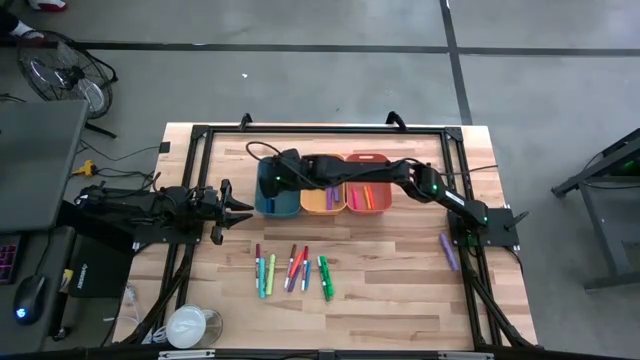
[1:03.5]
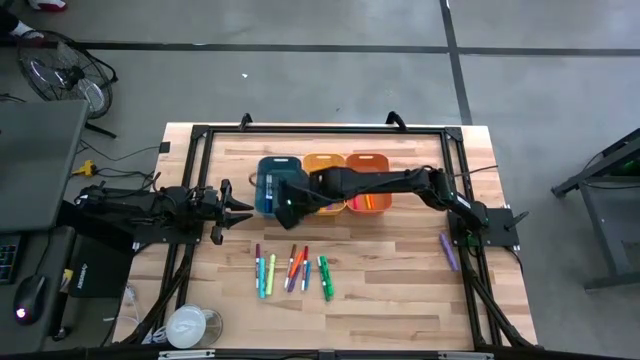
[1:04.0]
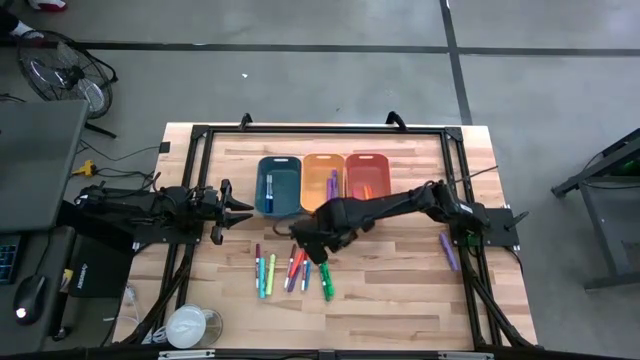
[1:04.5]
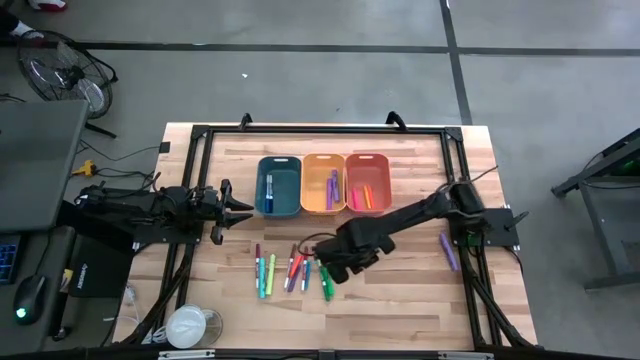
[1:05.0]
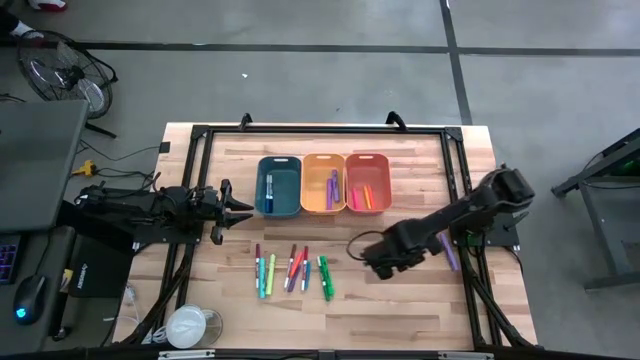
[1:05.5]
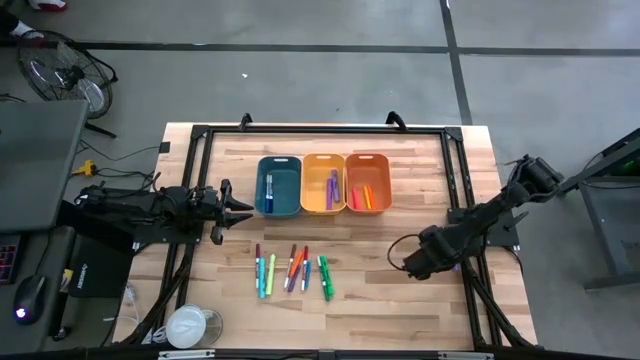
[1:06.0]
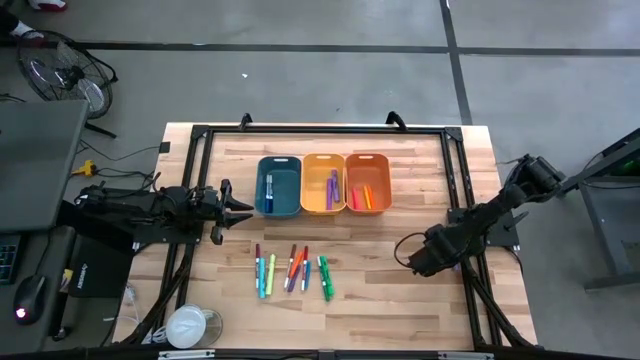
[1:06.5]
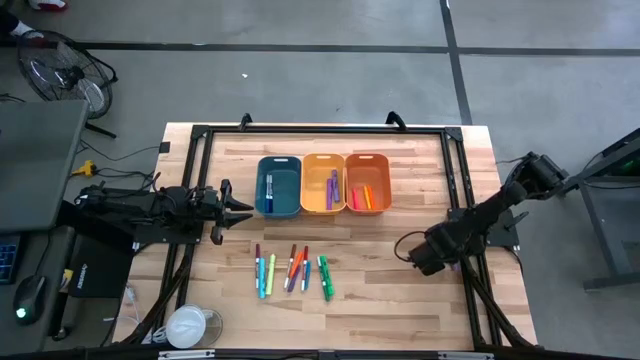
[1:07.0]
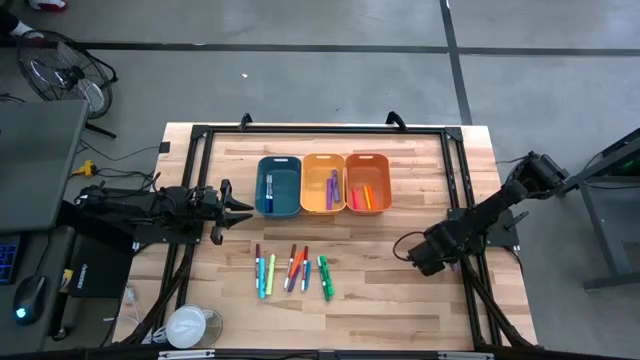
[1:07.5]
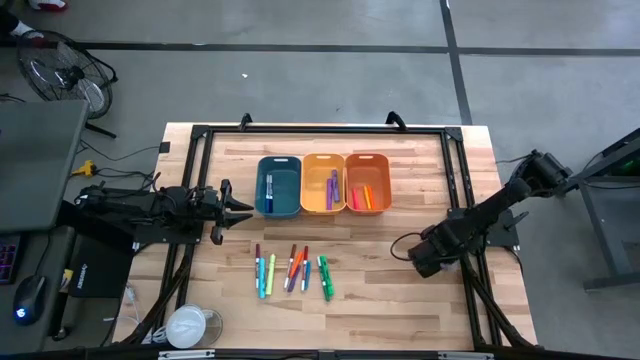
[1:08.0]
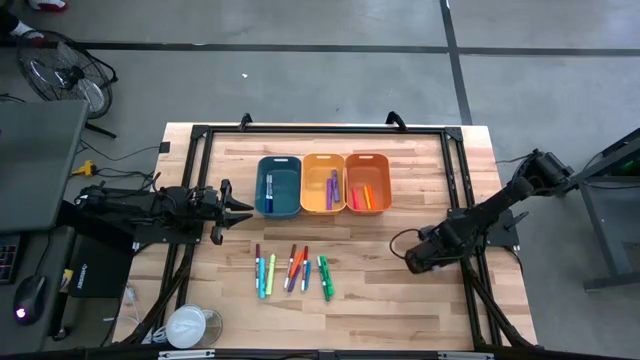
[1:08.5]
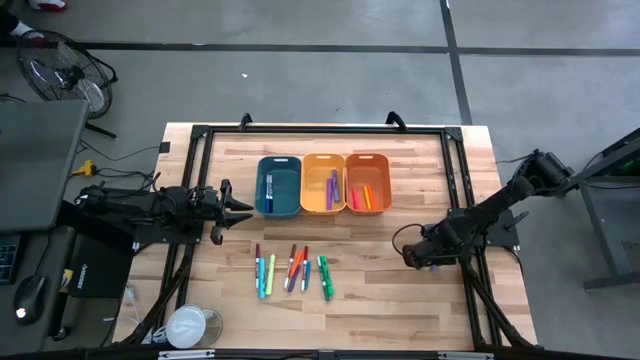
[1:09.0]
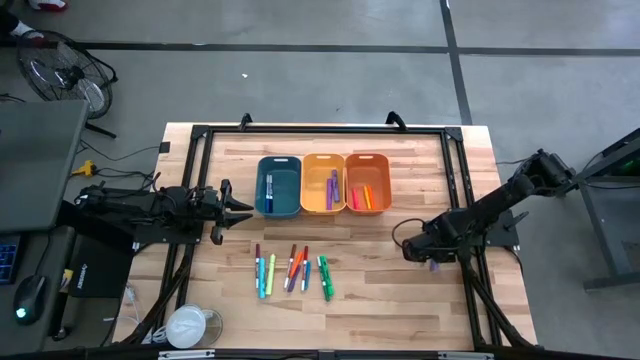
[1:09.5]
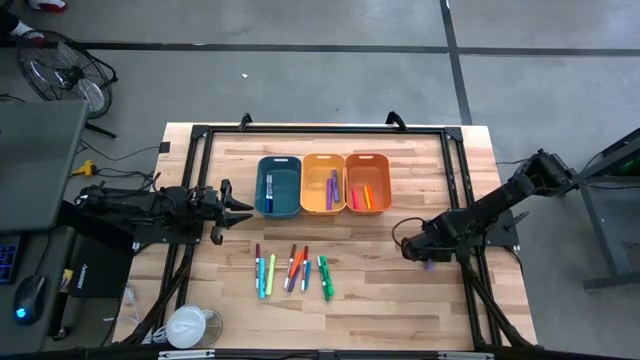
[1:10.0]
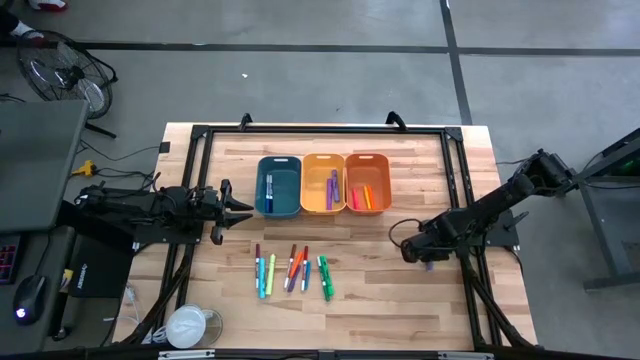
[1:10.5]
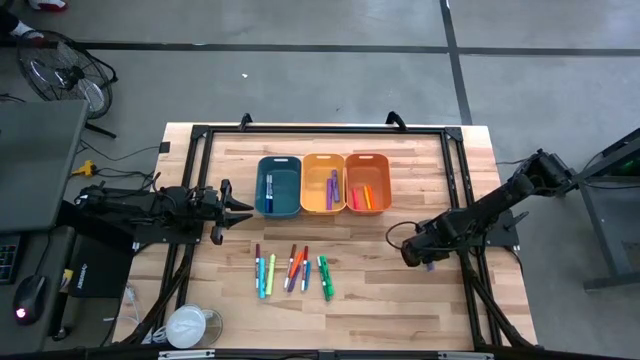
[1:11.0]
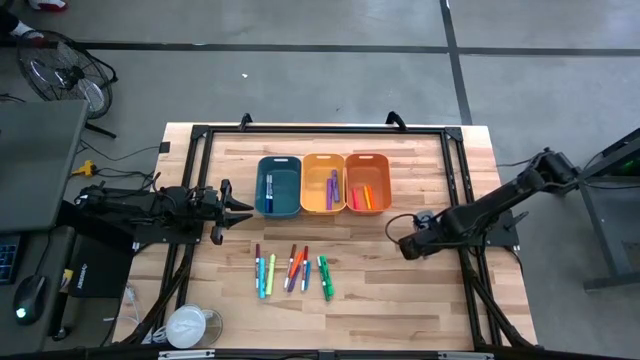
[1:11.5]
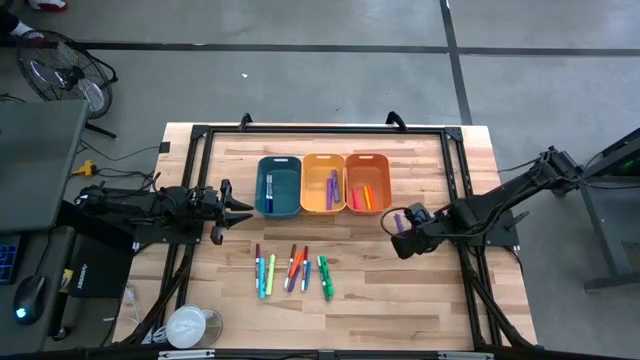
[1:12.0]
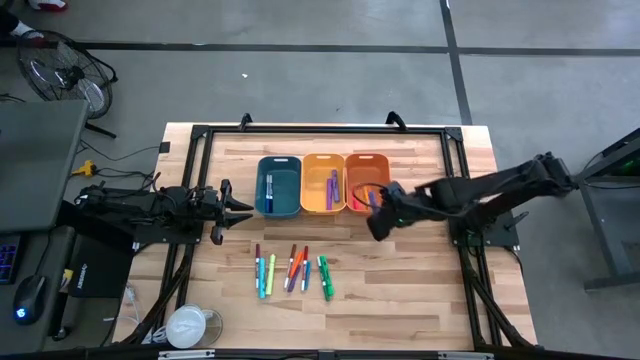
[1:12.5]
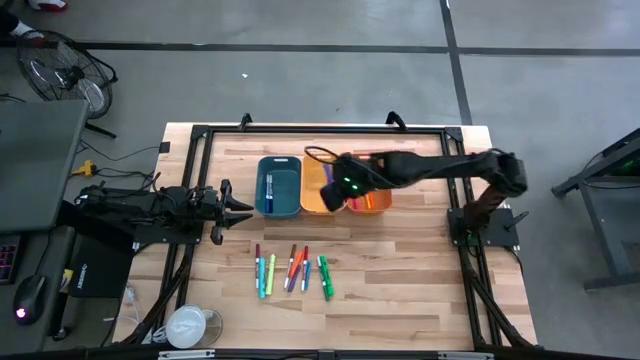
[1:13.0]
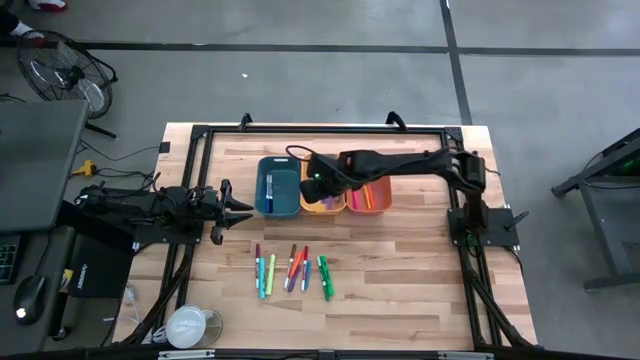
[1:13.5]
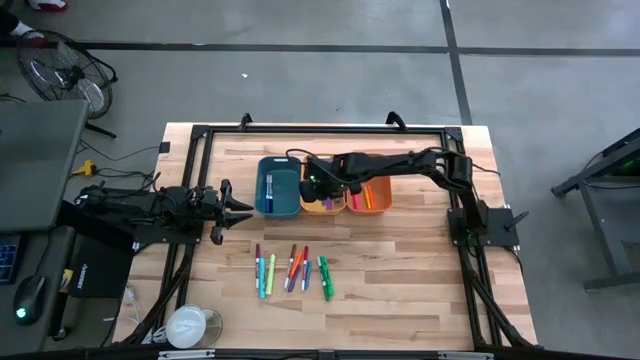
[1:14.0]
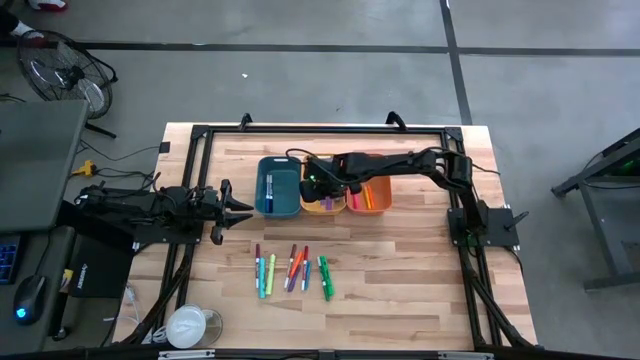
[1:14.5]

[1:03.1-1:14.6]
Task: Pick & Place Markers
Put the light violet highlighter pen into the yellow bin

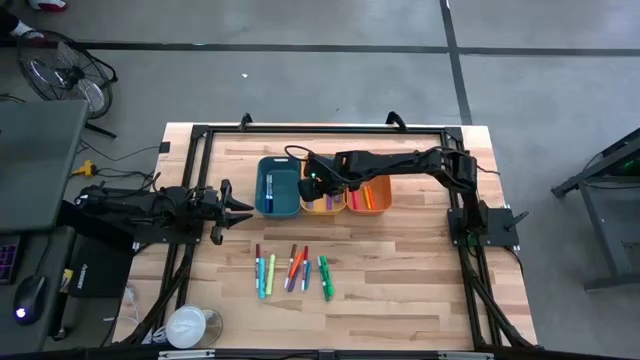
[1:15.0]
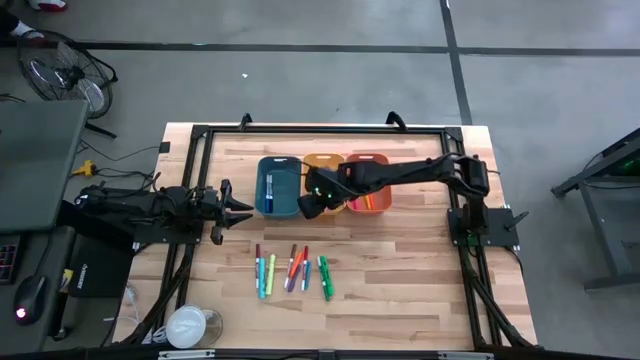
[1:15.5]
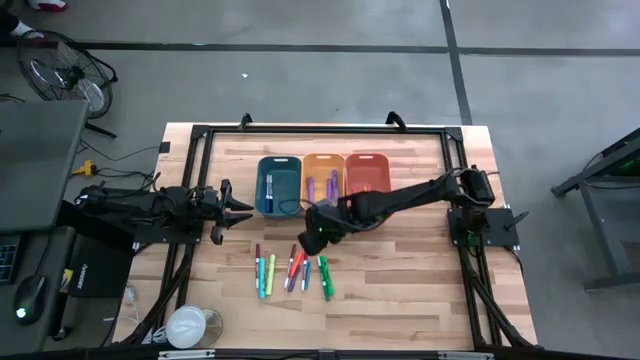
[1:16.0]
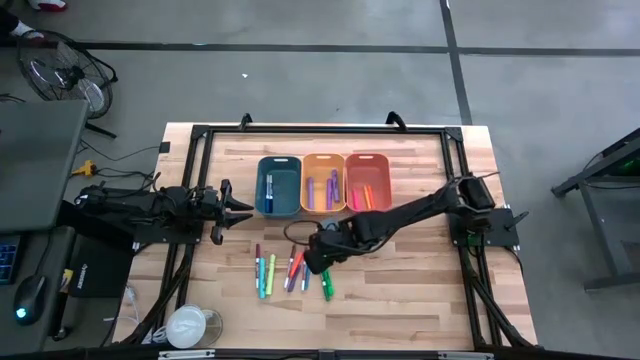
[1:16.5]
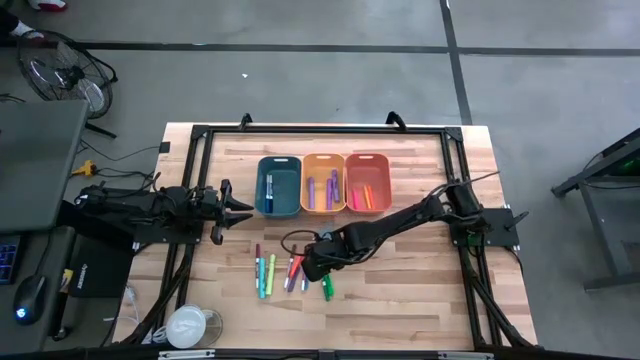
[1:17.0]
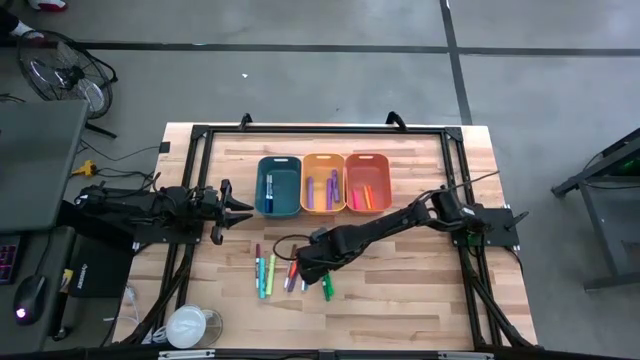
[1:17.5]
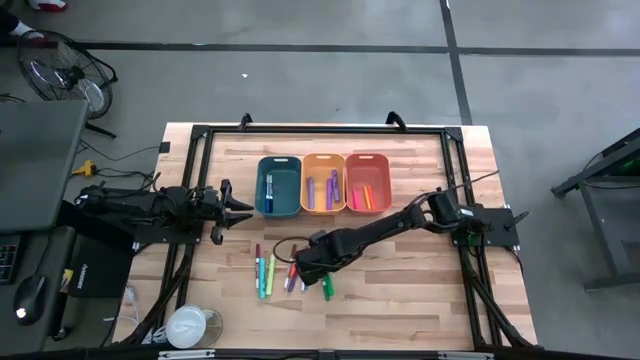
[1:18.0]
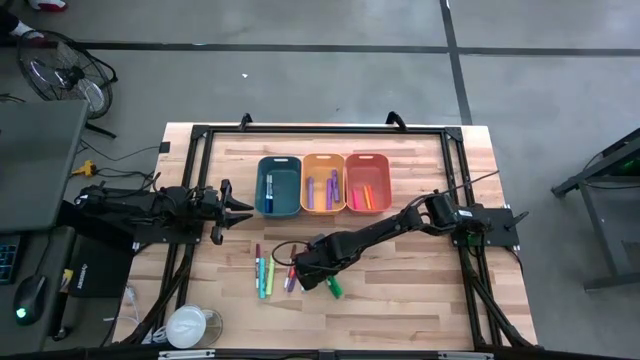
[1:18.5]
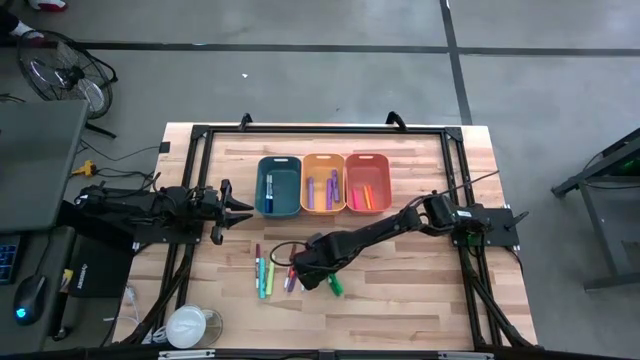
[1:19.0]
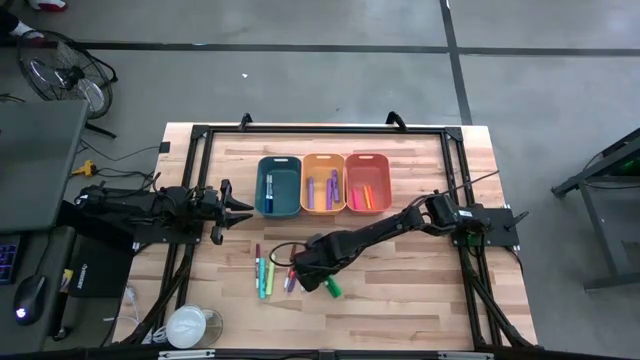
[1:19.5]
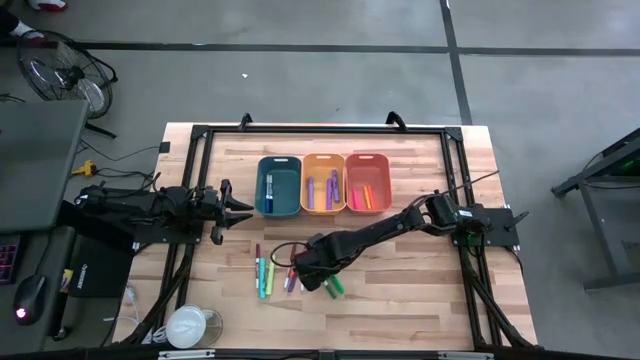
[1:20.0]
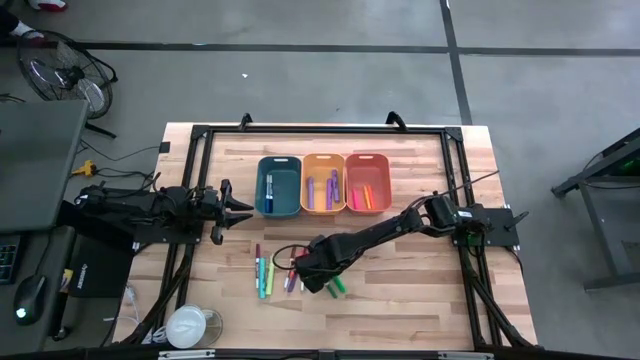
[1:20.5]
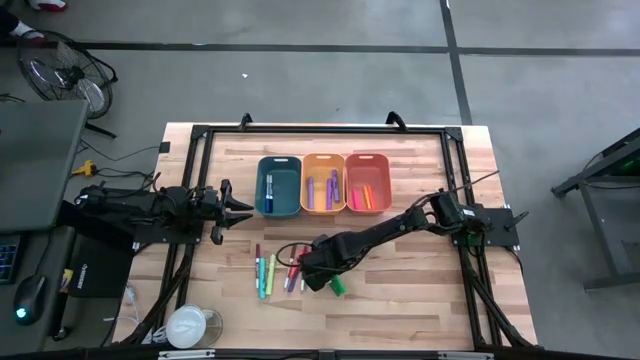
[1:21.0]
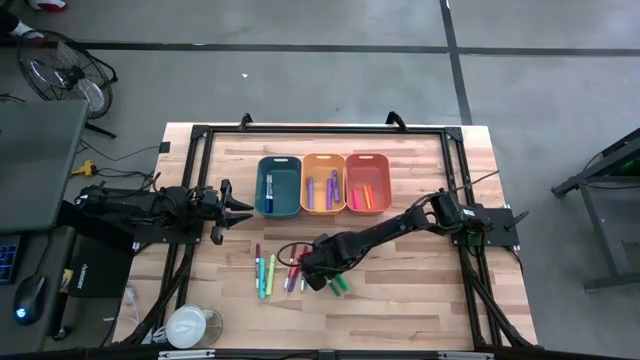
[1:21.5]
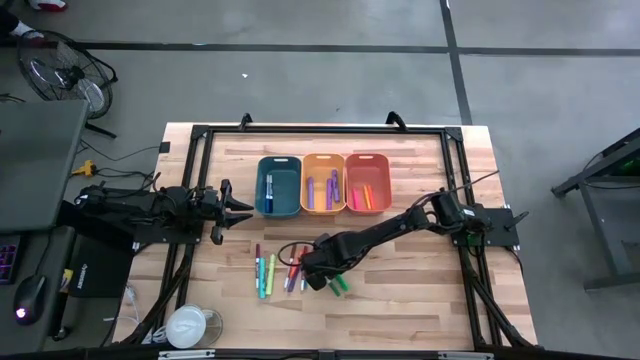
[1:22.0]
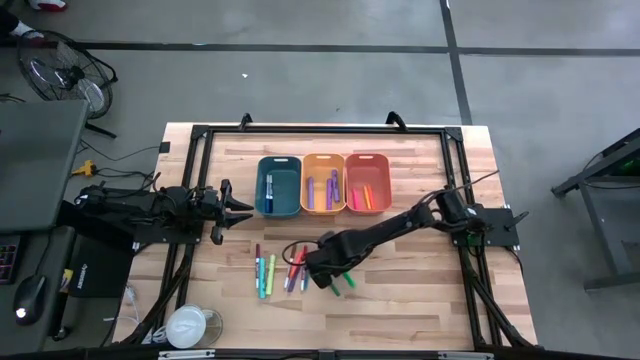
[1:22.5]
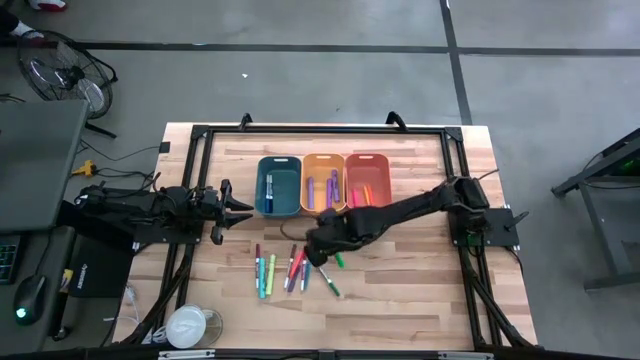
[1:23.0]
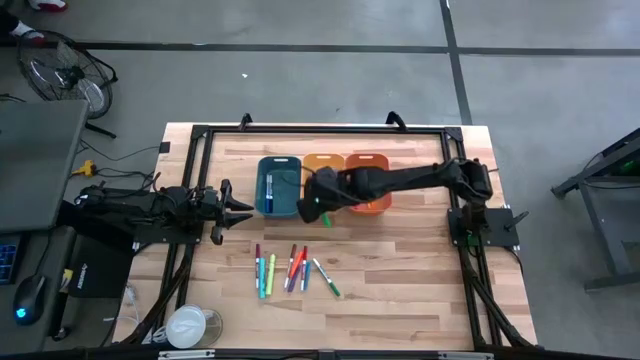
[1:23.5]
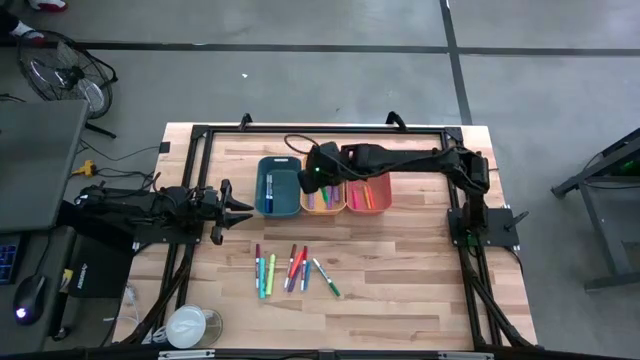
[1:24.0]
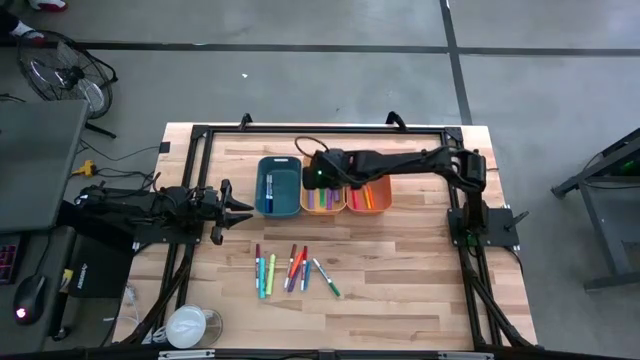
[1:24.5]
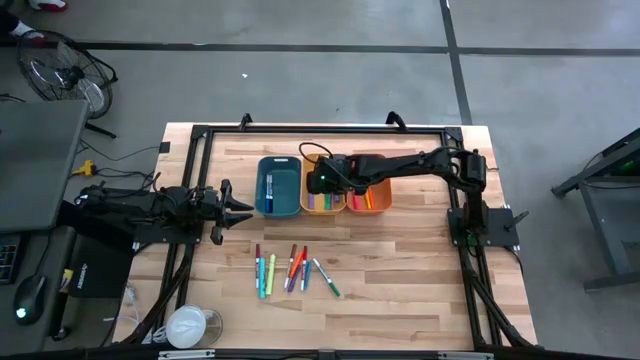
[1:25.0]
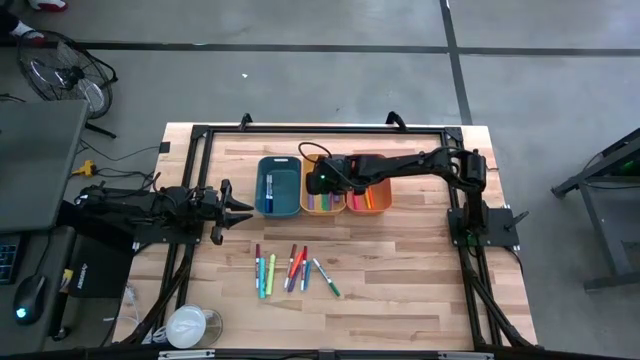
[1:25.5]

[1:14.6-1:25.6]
Put the green highlighter pen into the yellow bin
